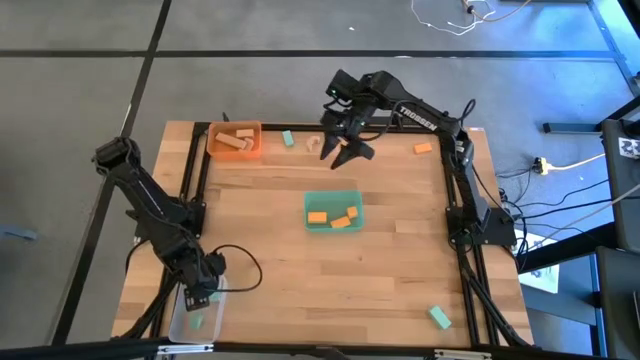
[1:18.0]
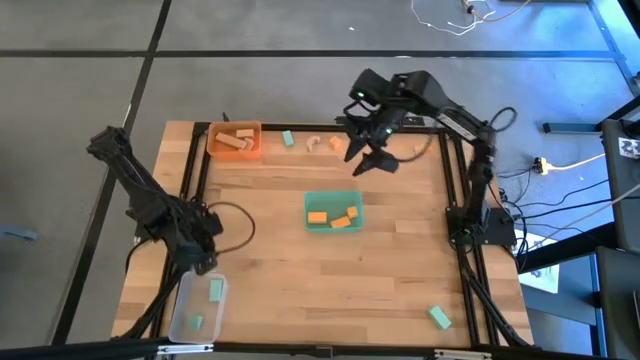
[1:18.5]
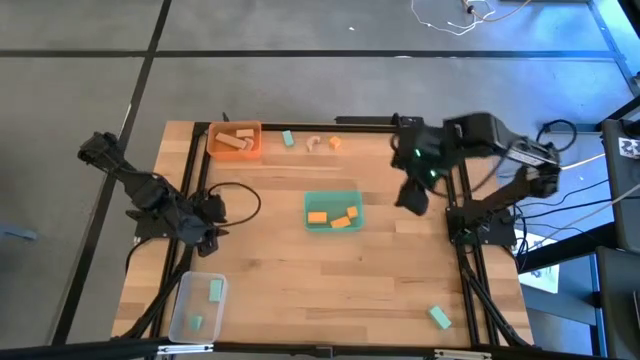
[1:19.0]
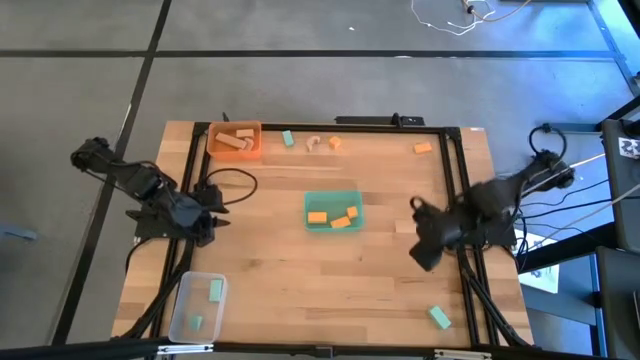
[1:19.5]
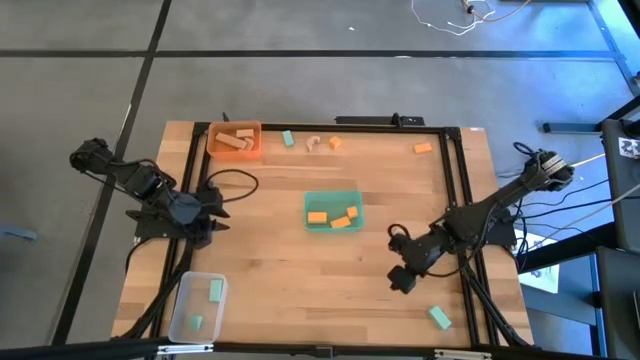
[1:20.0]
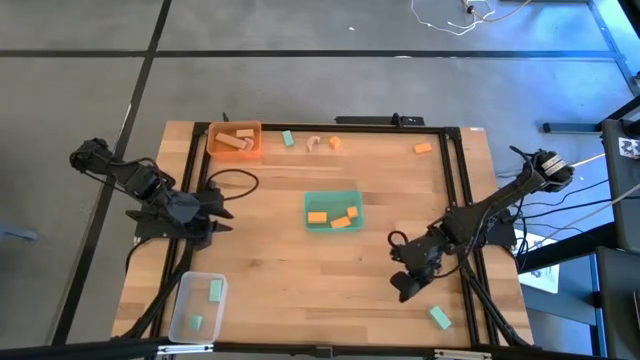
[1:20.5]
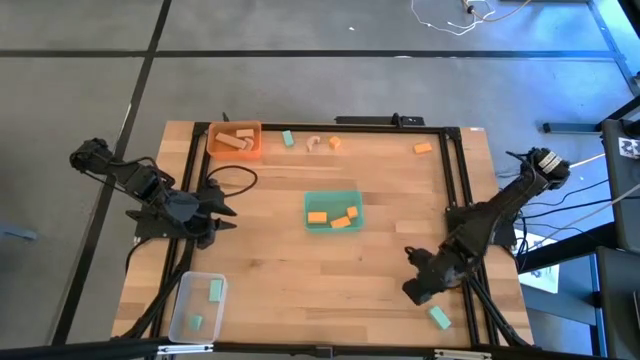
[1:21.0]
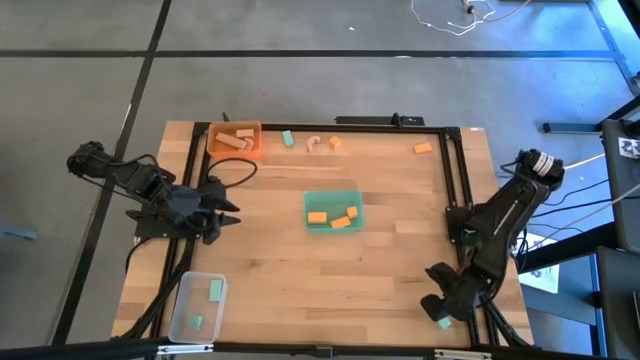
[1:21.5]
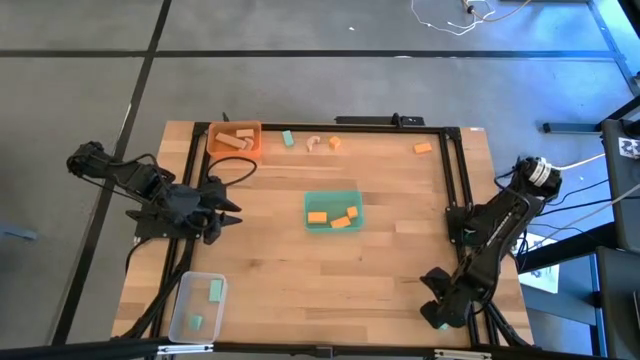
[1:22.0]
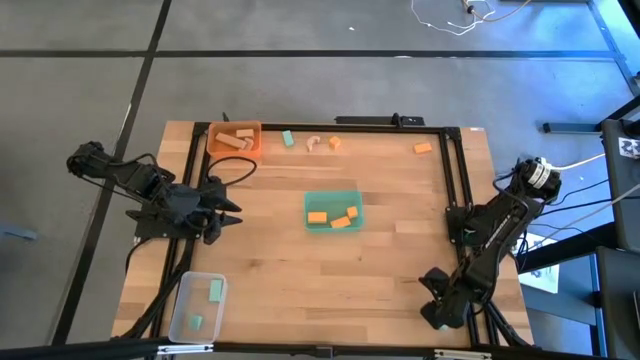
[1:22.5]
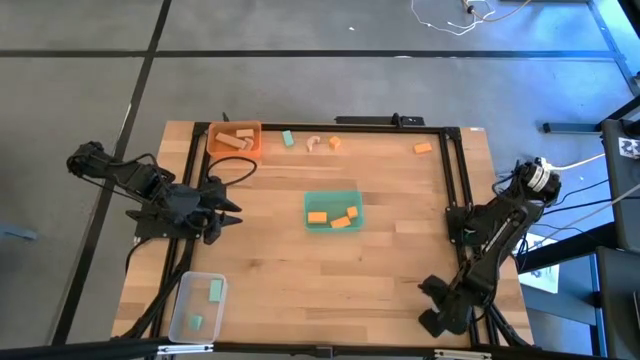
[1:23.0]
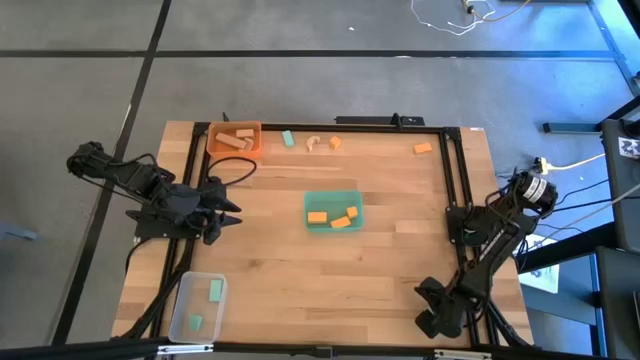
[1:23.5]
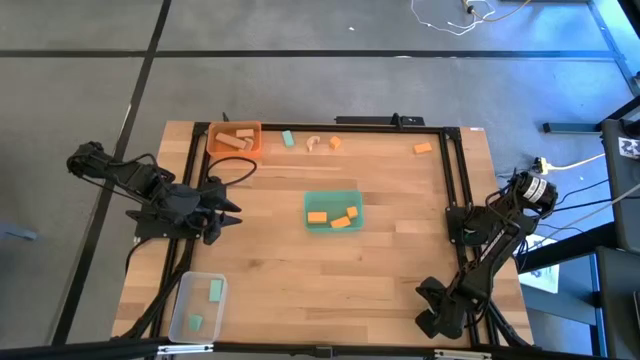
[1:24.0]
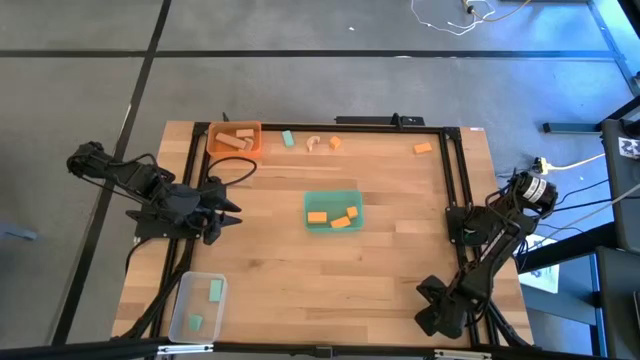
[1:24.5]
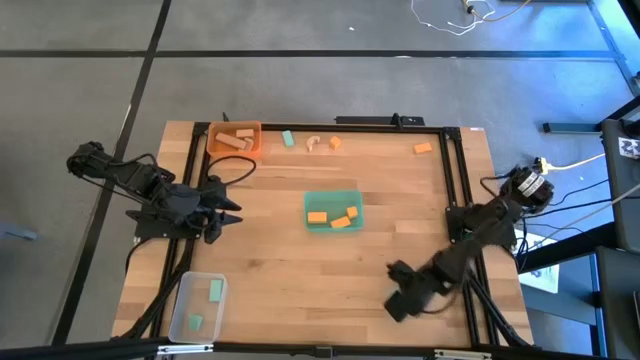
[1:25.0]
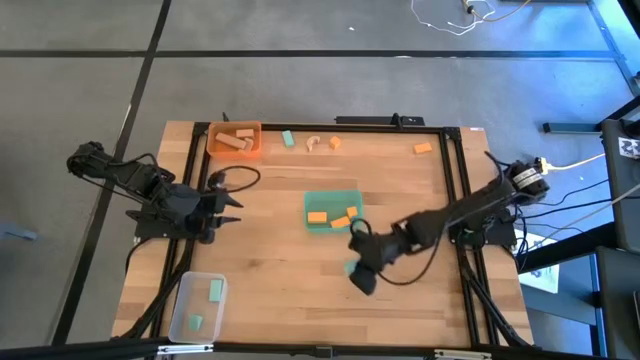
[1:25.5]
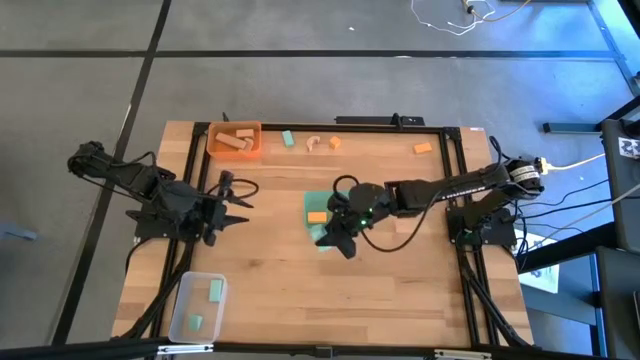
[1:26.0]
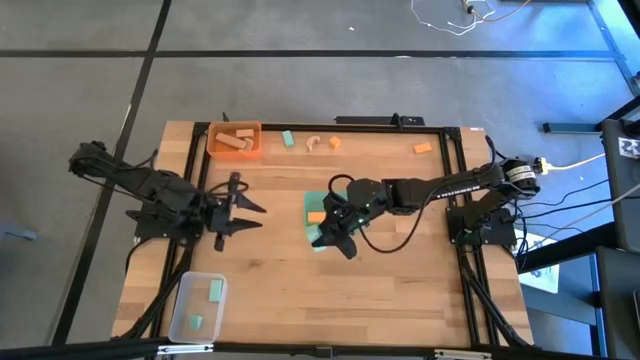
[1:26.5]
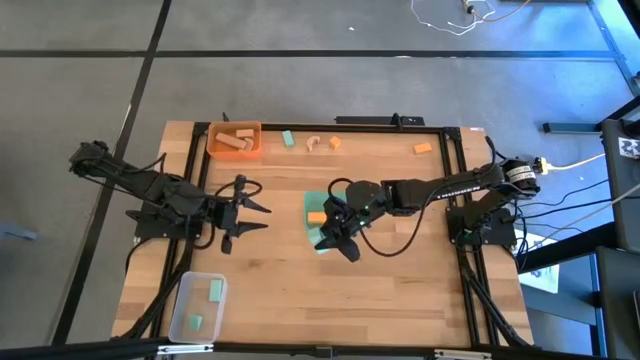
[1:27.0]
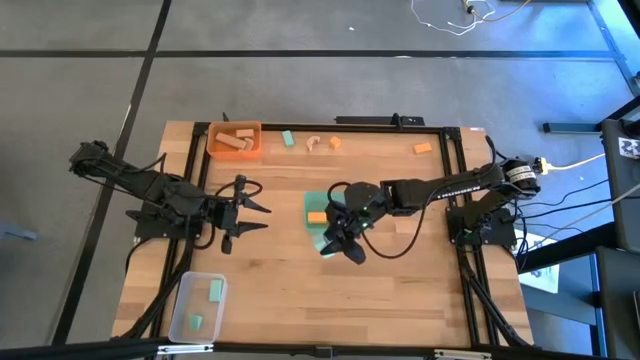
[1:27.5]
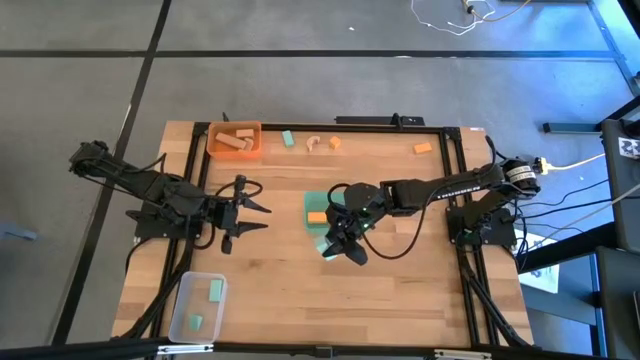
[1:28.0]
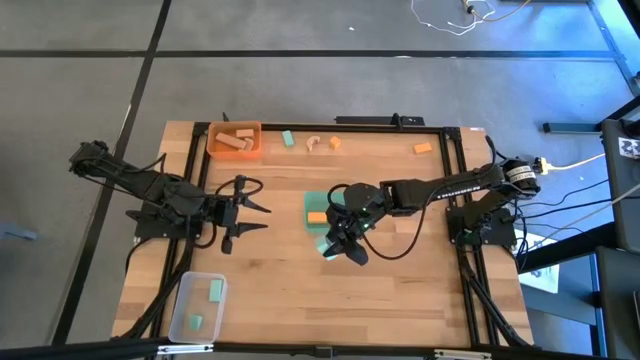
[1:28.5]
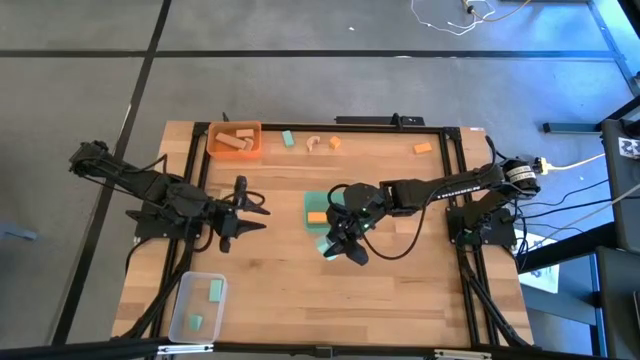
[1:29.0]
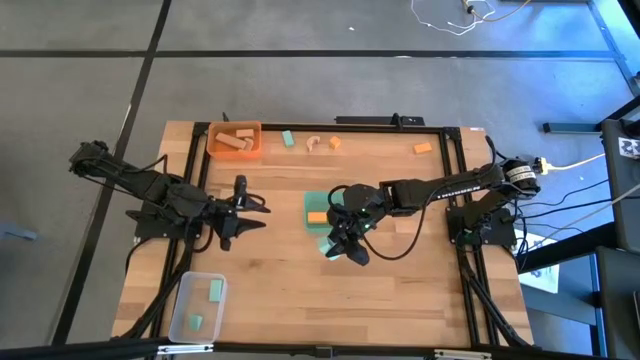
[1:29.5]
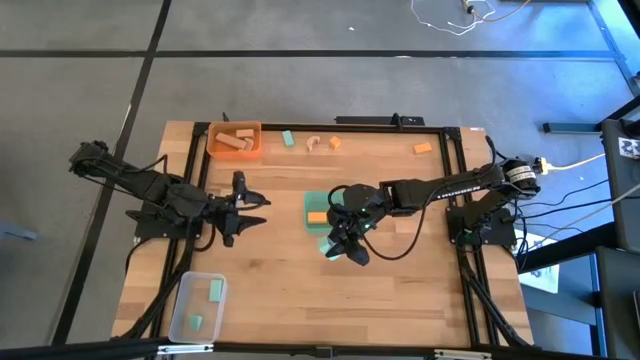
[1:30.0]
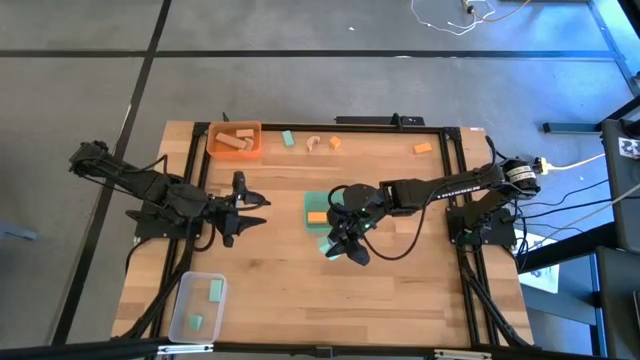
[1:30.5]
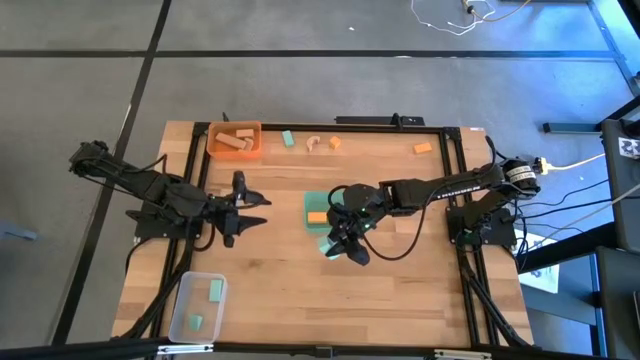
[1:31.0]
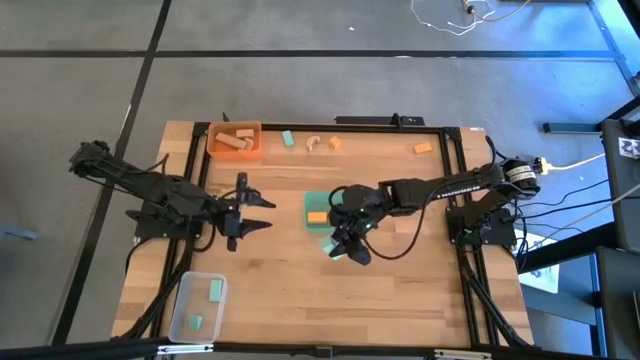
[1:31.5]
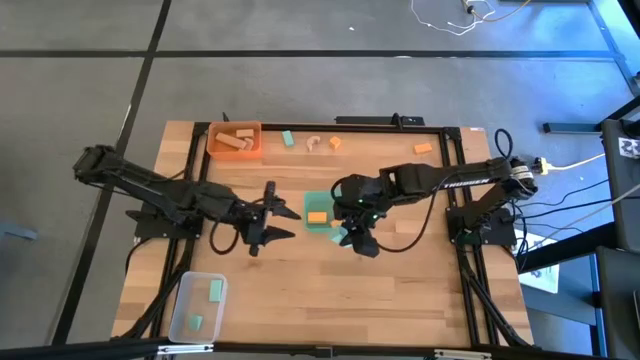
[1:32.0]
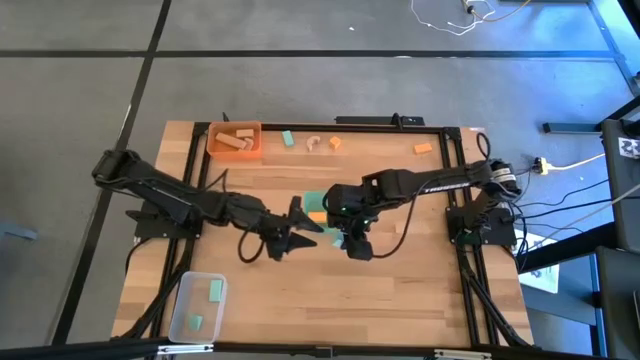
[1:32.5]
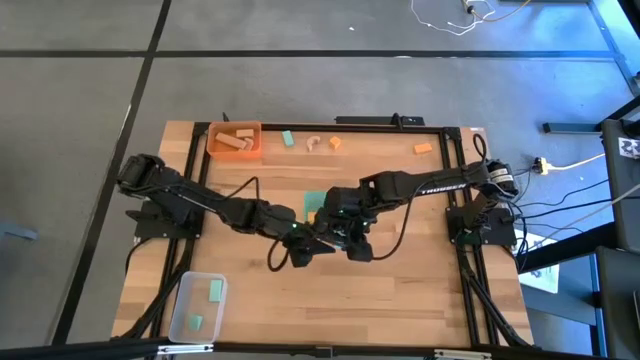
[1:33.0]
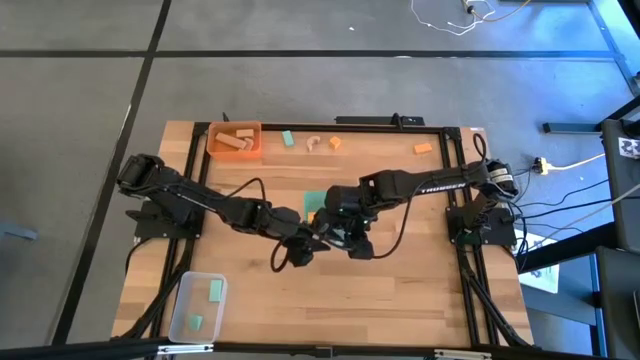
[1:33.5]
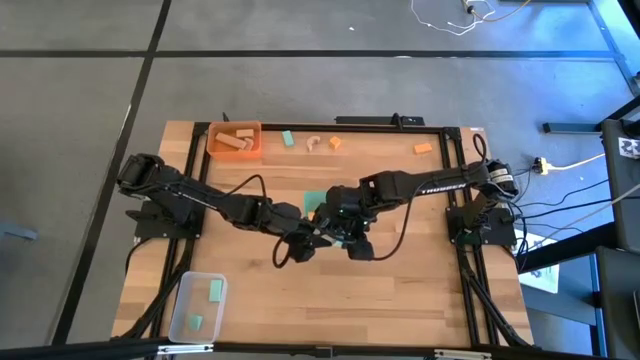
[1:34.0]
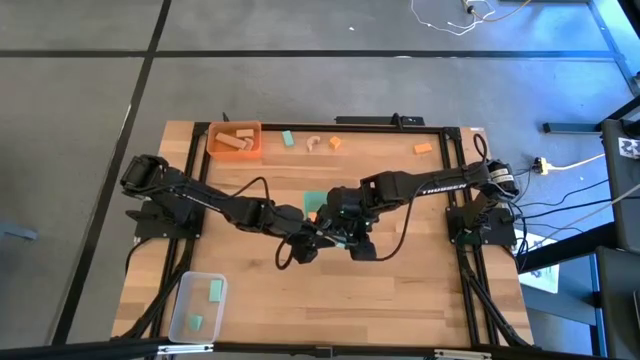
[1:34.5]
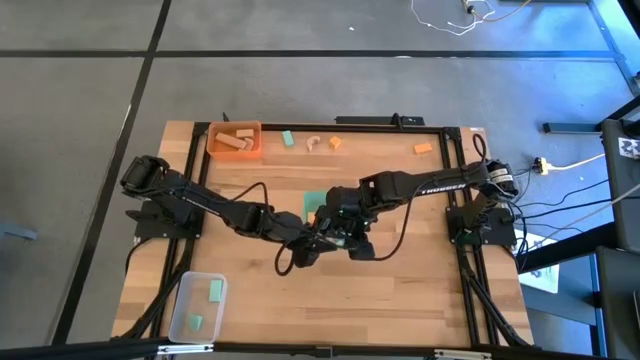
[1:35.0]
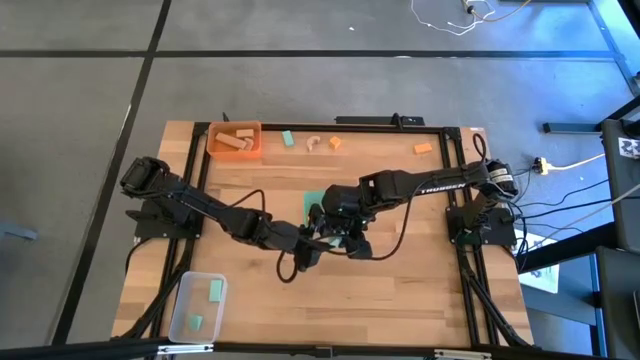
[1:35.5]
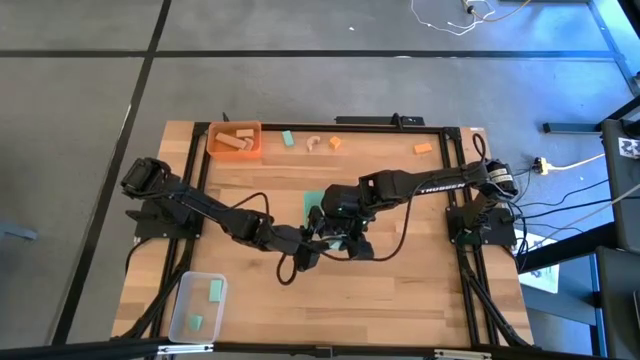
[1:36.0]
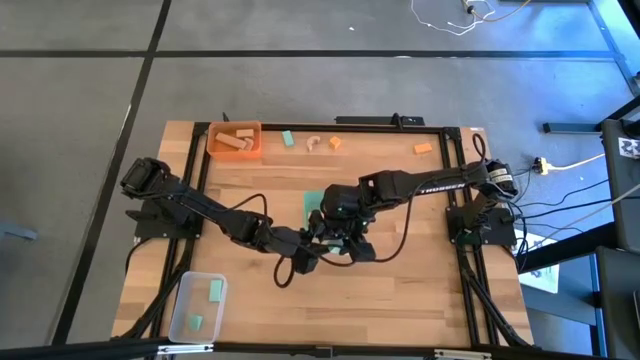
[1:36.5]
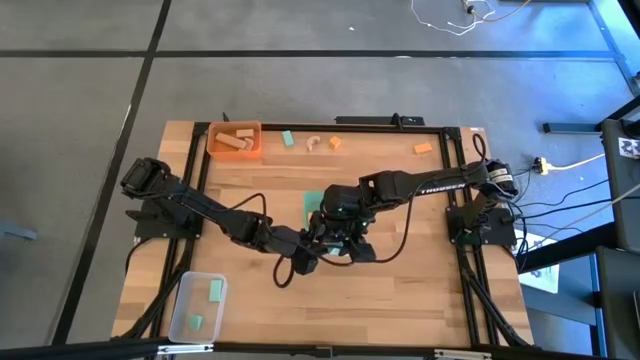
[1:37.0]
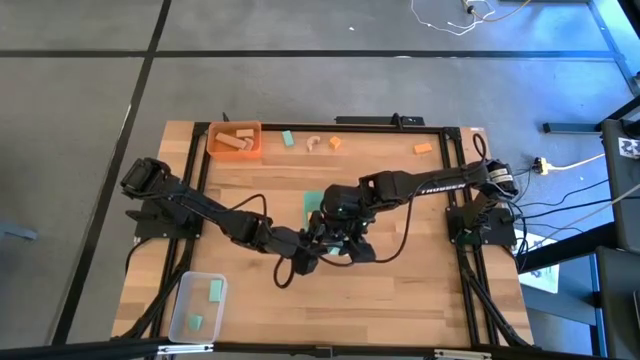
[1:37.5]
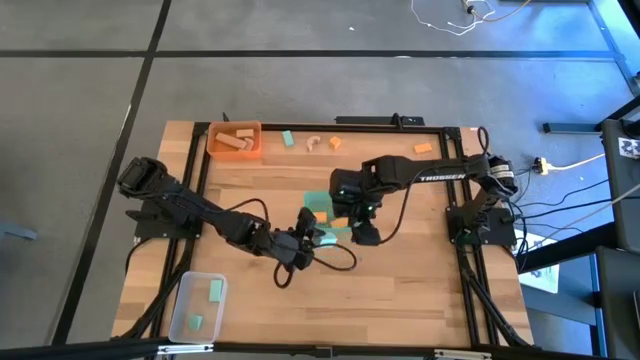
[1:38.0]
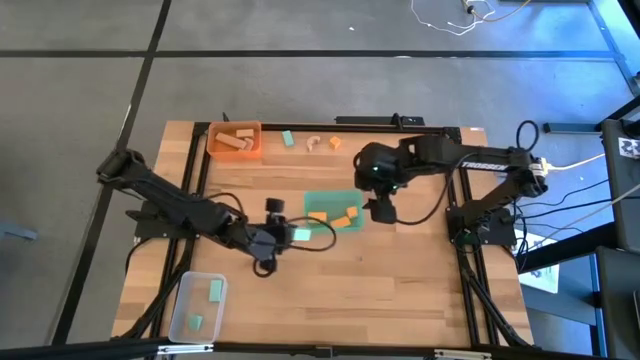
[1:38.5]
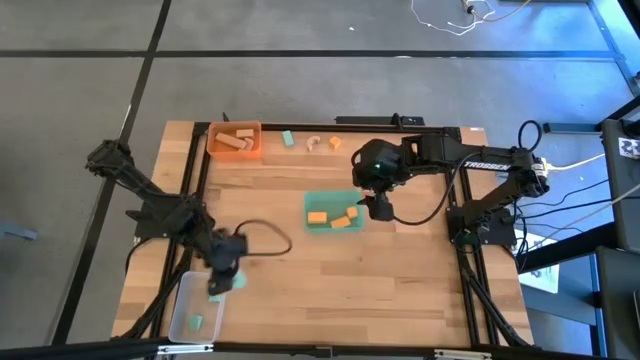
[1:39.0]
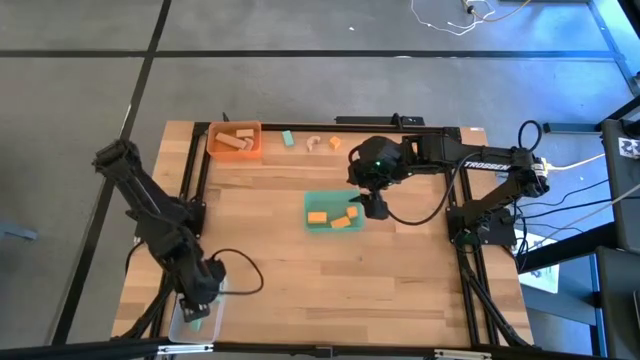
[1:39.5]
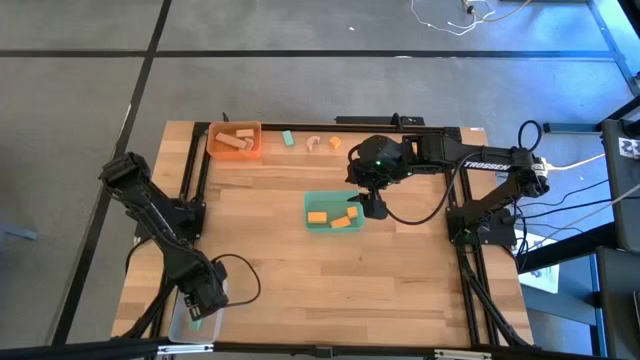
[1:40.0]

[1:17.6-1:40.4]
Task: Sort & place blocks by color
Put the blue block into the transparent bin
